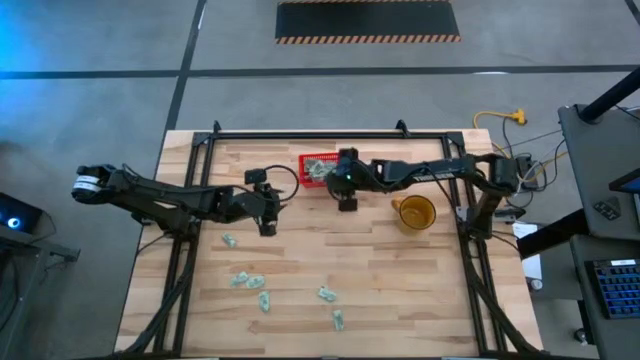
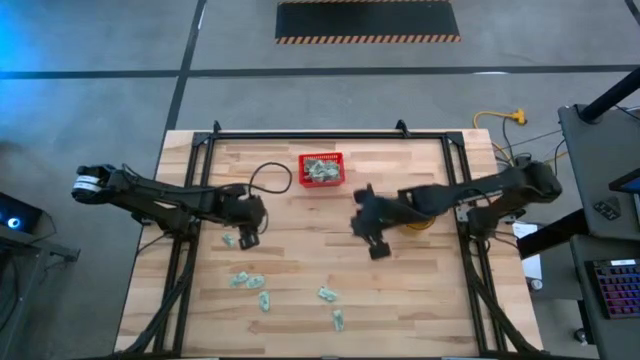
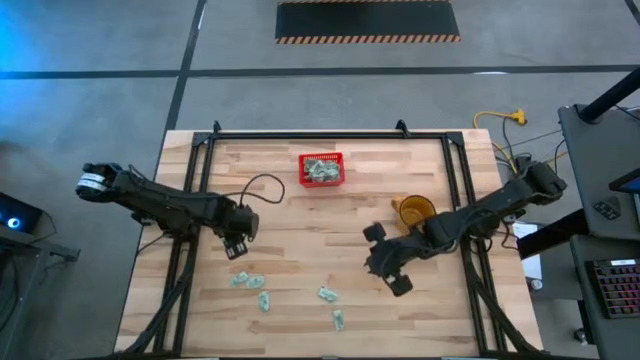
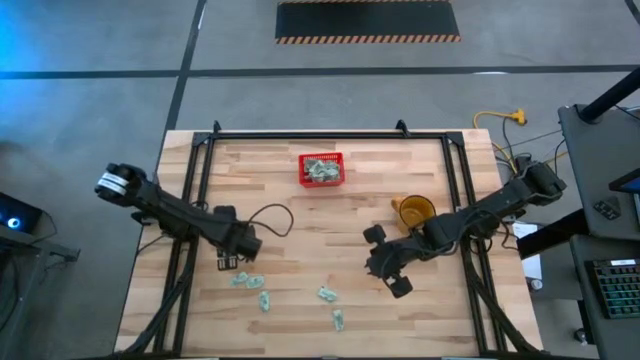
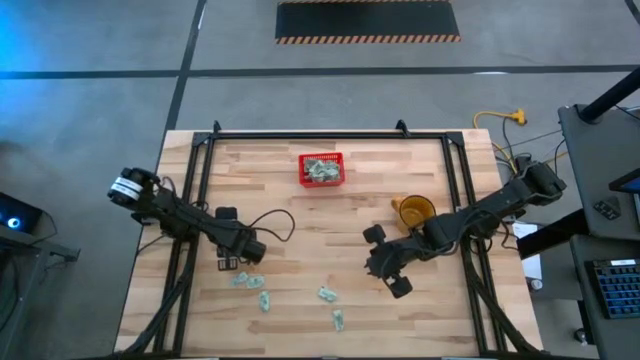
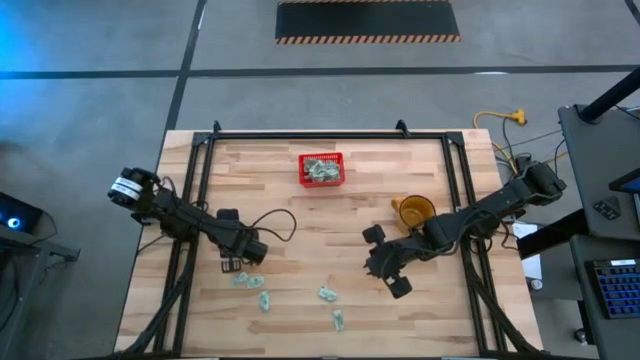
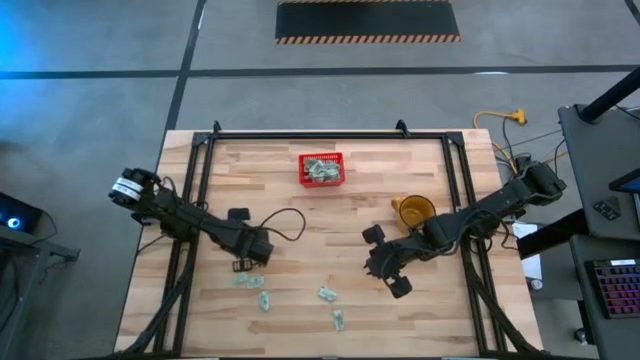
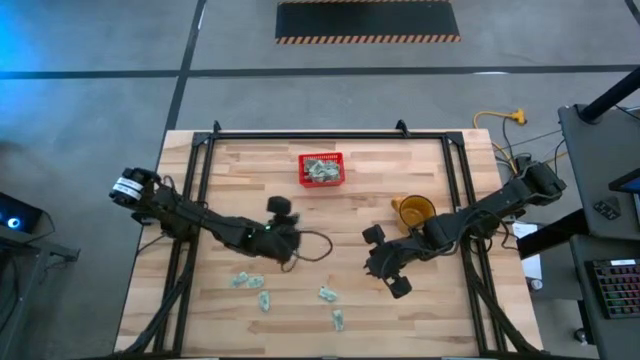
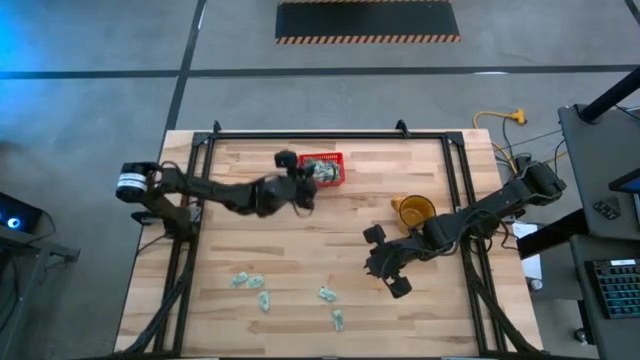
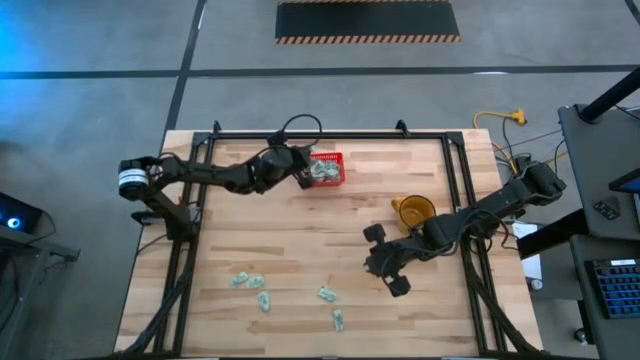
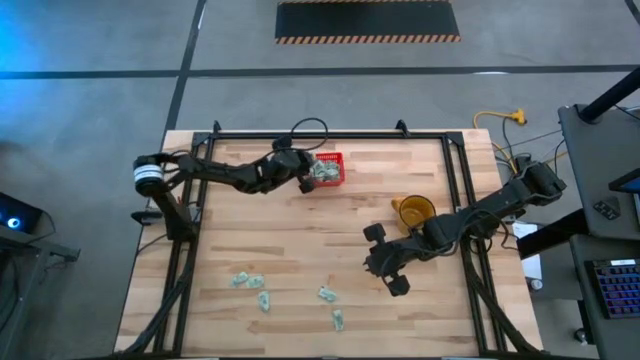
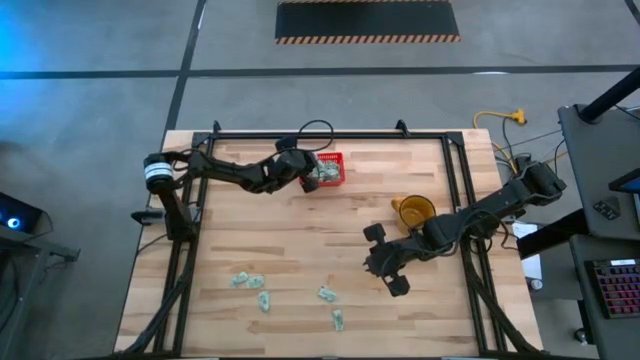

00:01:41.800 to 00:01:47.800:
Task: Pick and place Stevia / Truvia into bins
Put the white stevia packet into the red bin

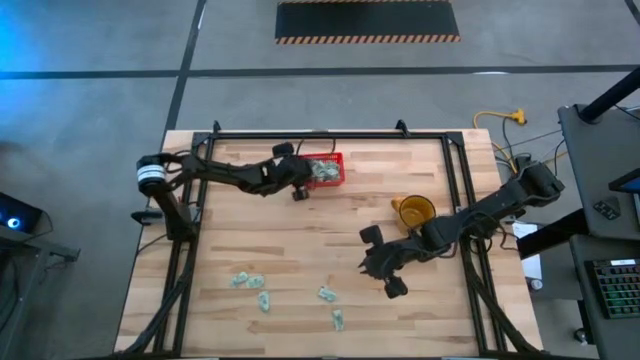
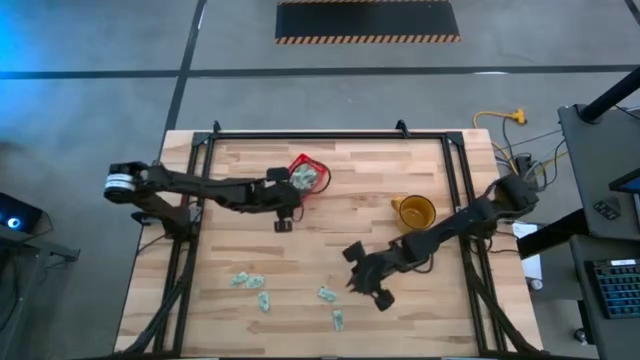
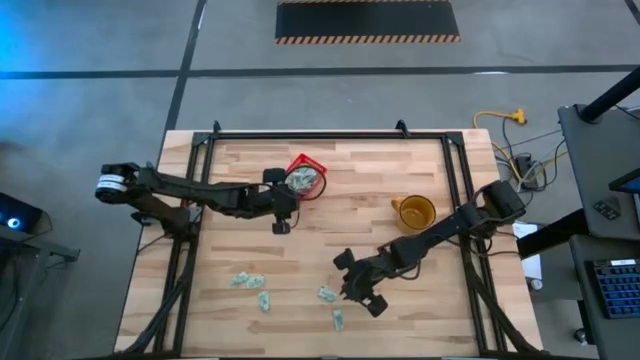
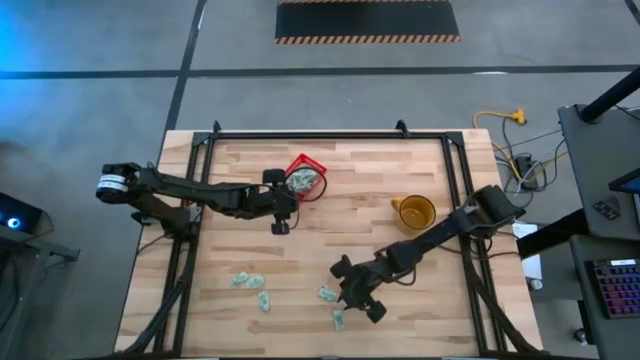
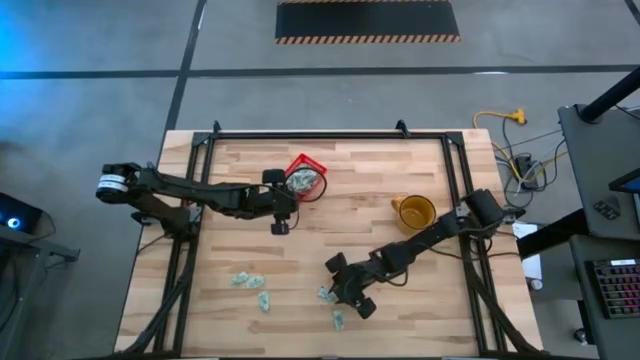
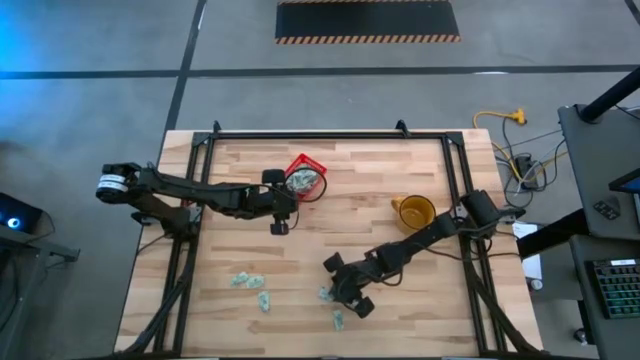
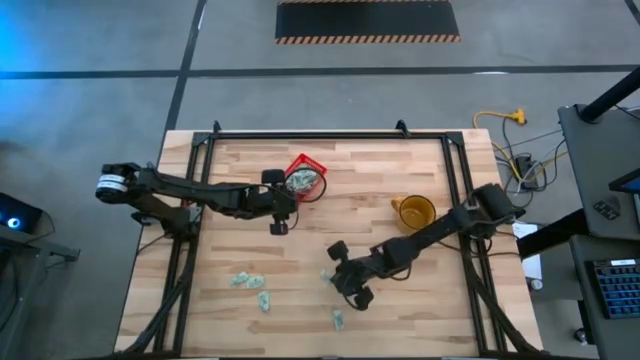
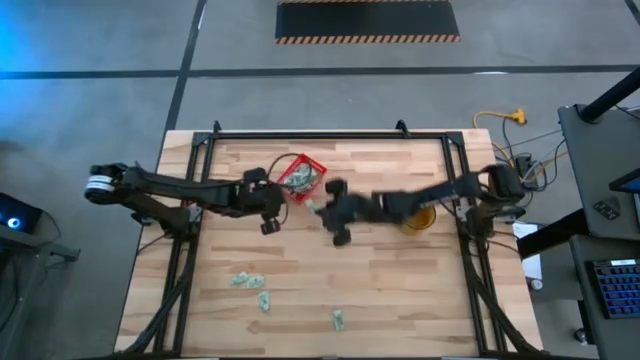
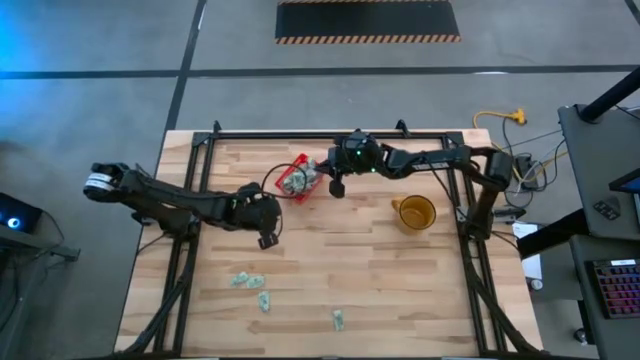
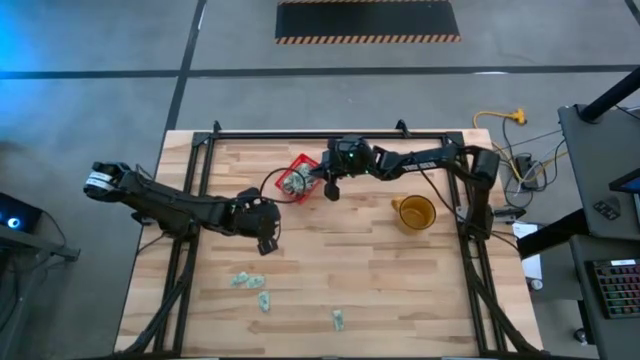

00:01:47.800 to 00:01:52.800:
Put the white stevia packet into the red bin

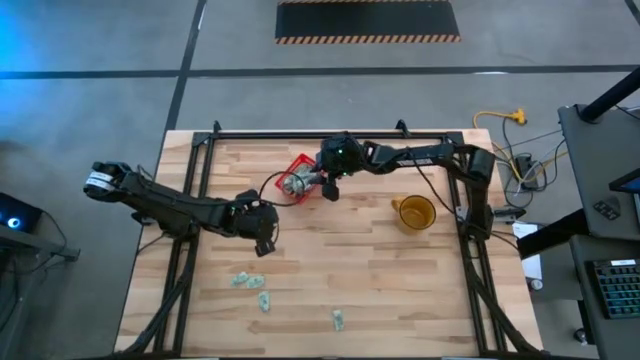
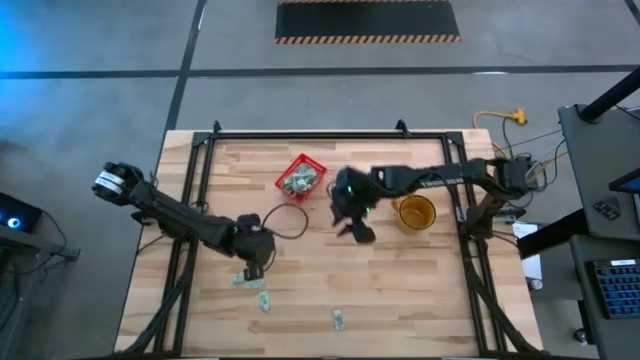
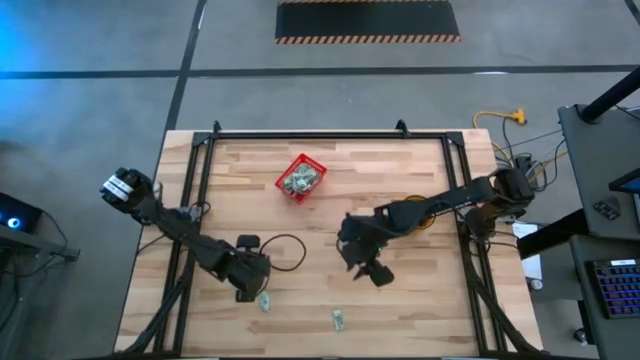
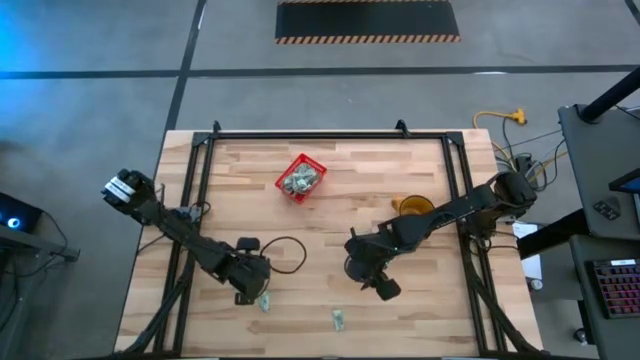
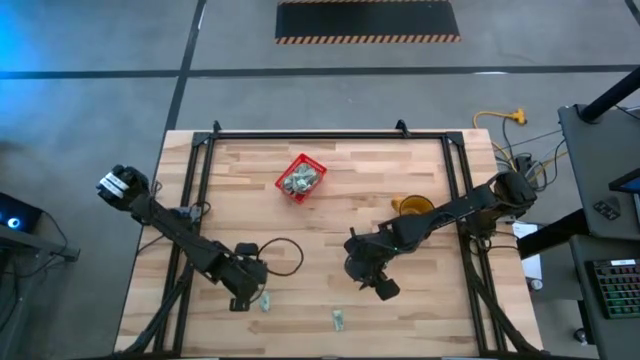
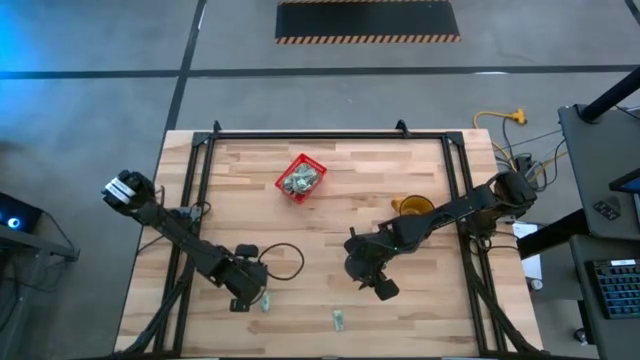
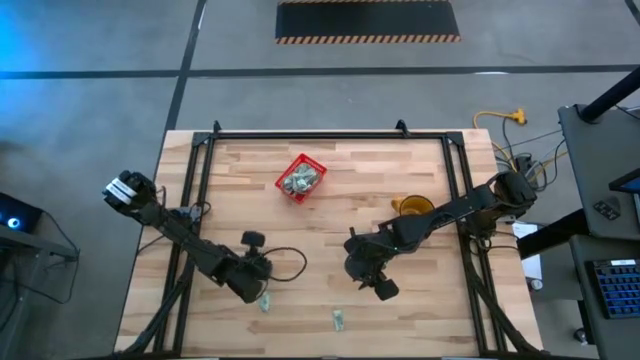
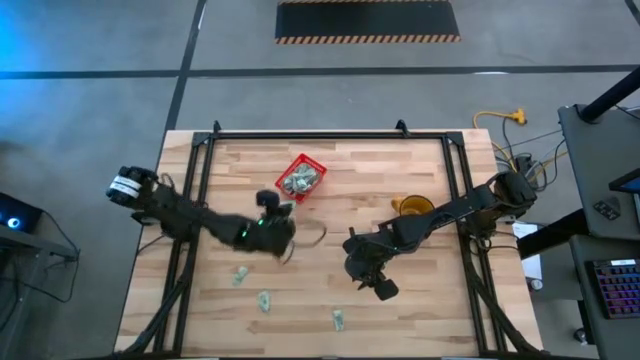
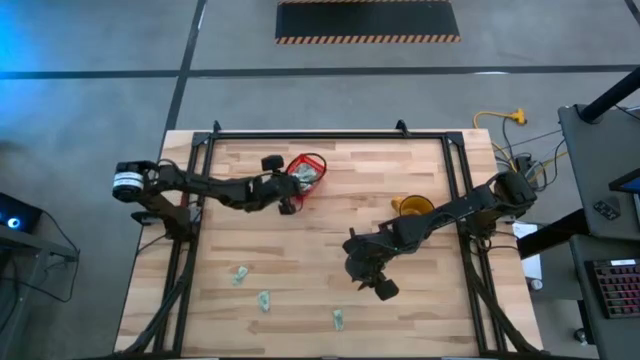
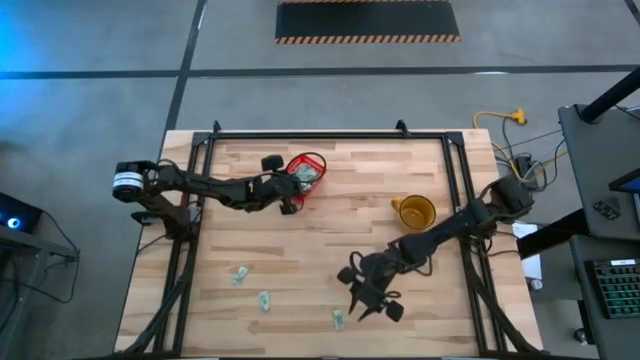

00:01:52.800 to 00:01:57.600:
Put the white stevia packet into the red bin

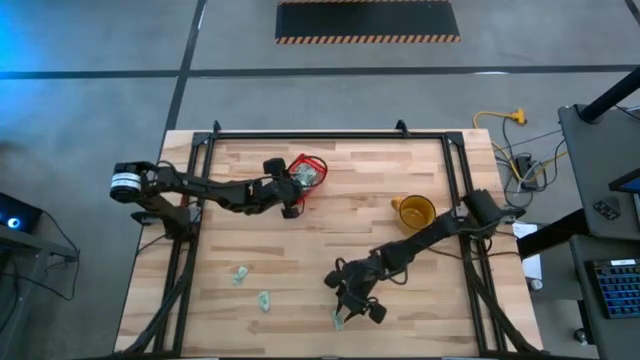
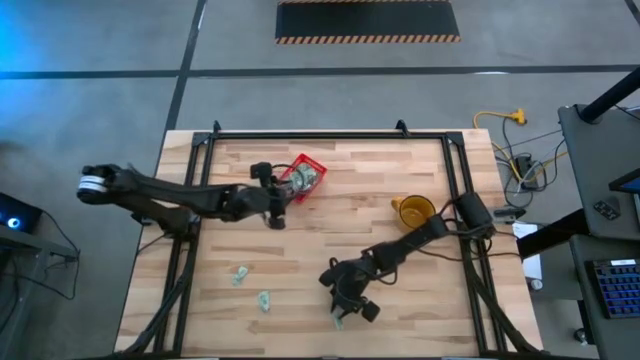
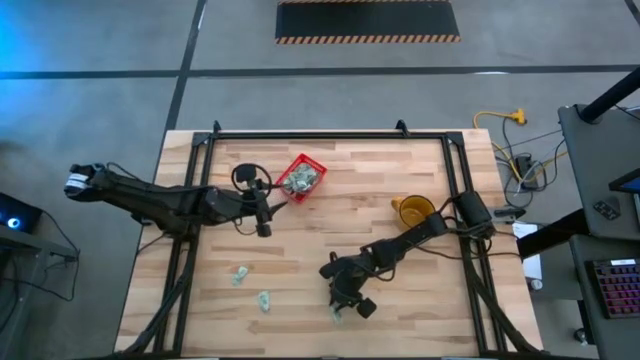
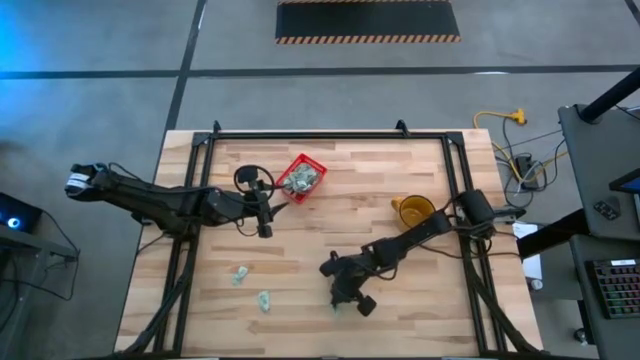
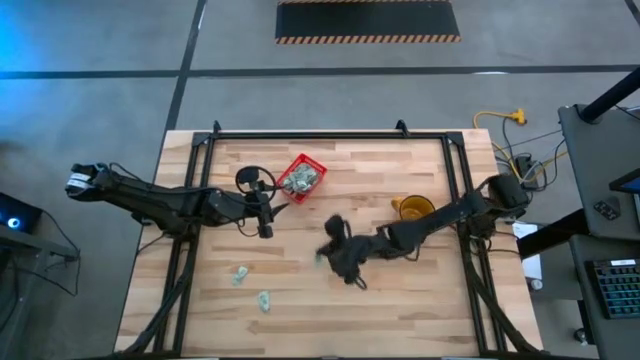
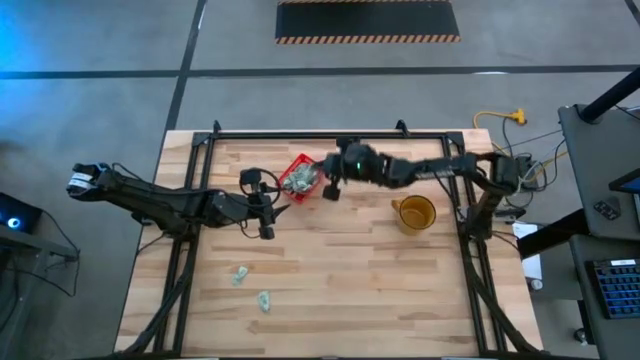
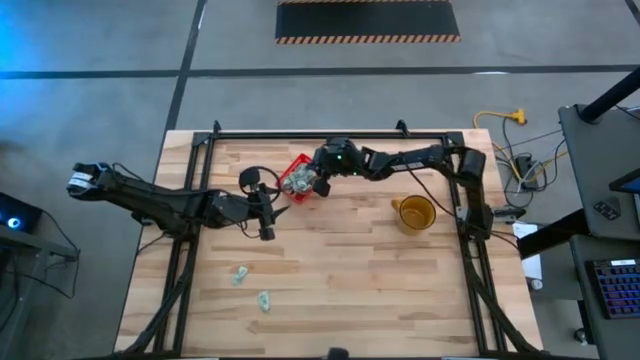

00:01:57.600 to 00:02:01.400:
Put the white stevia packet into the red bin

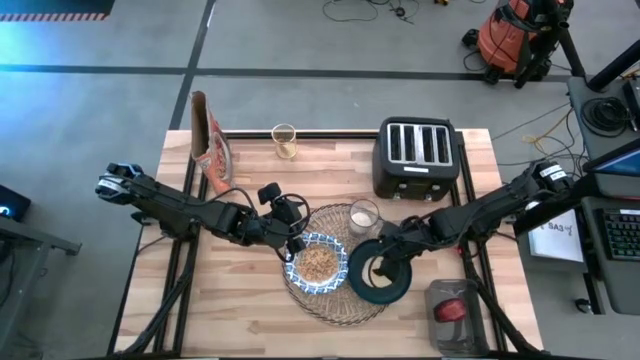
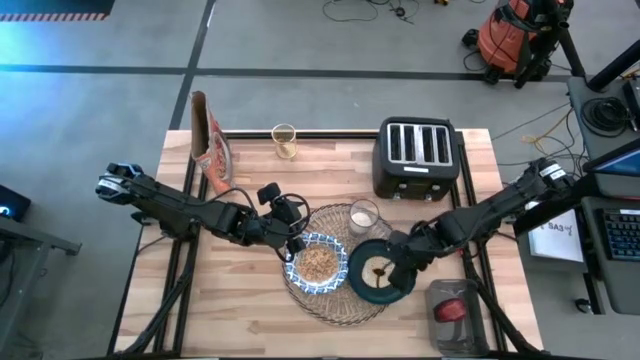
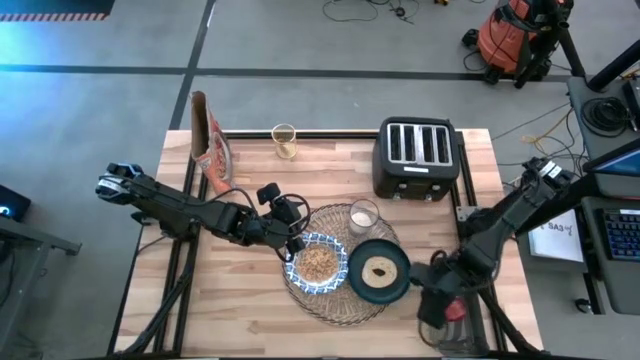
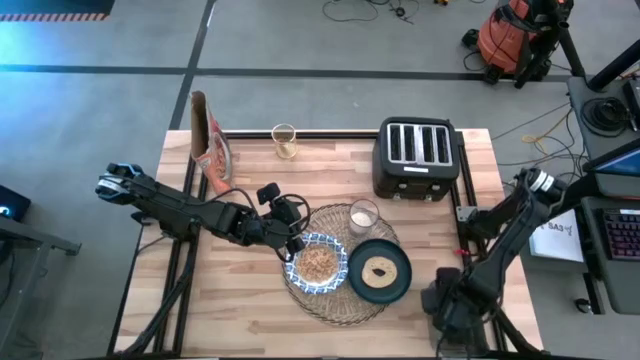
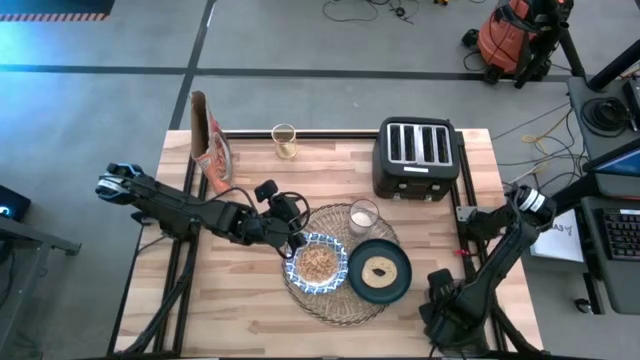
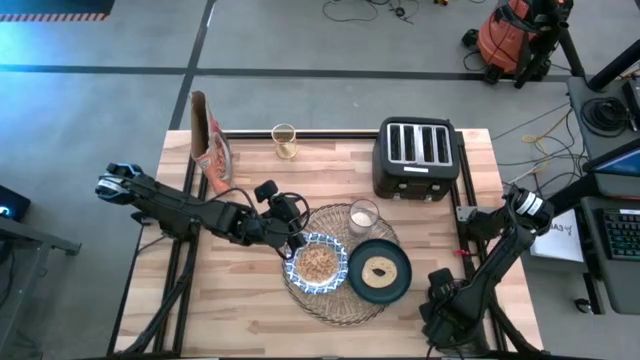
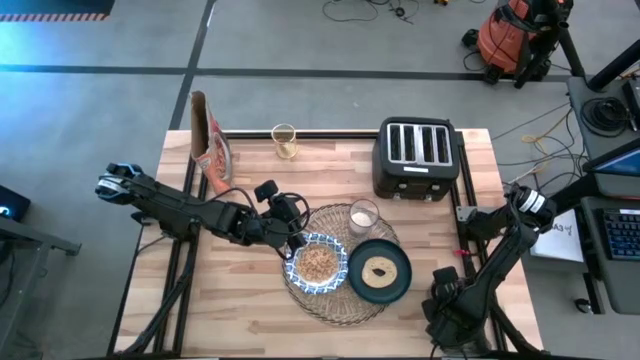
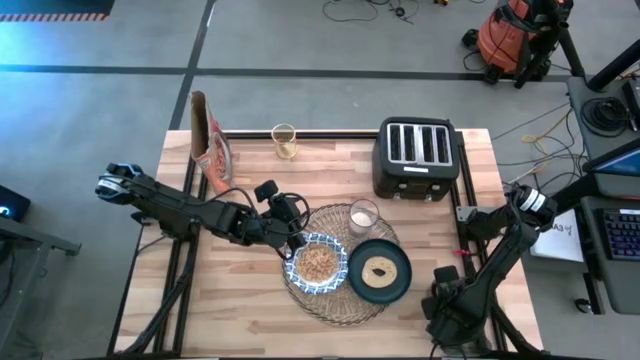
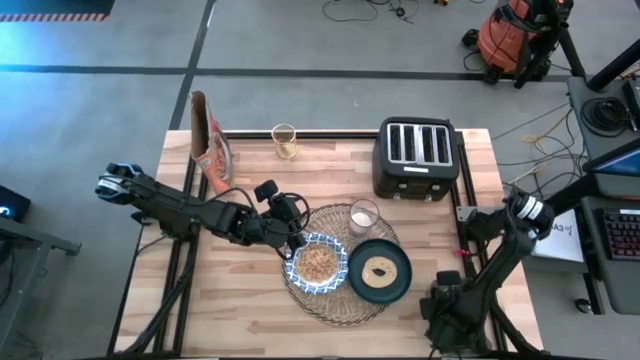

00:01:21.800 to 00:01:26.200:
Task: Arrange a breakfast setting
Put the red apple to the left of the transparent glass of milk on the brown table mat
